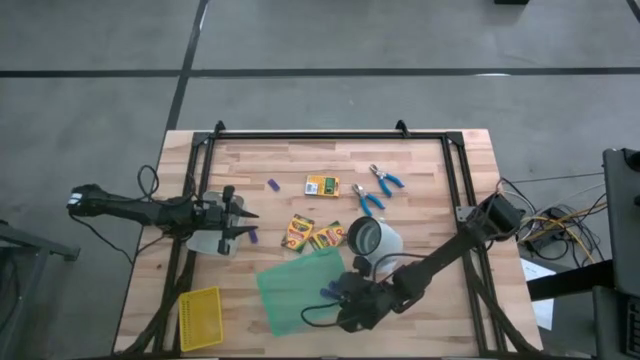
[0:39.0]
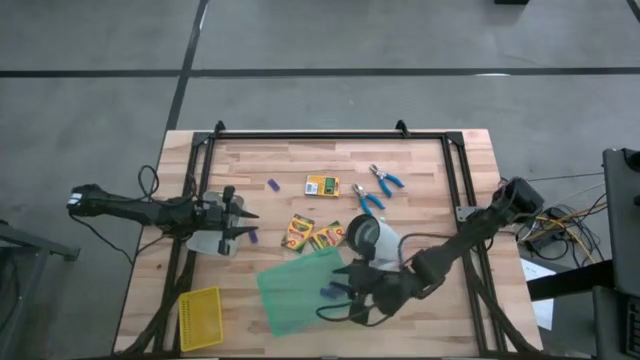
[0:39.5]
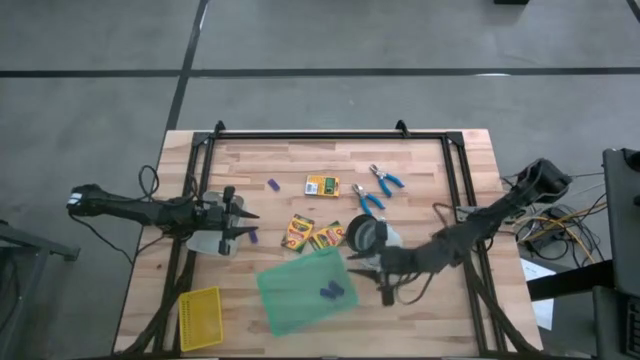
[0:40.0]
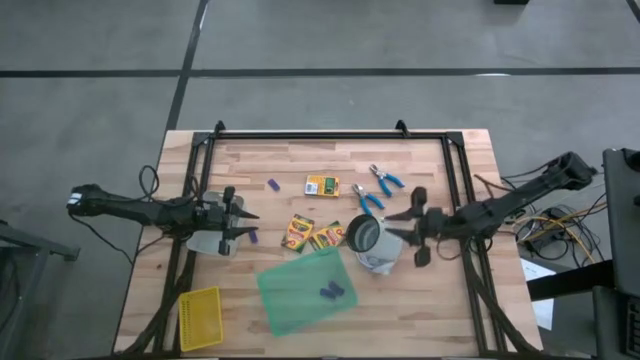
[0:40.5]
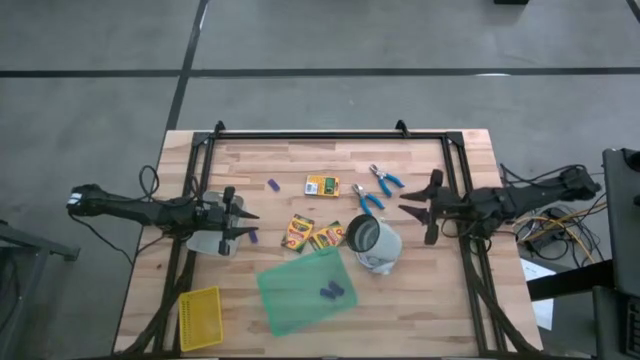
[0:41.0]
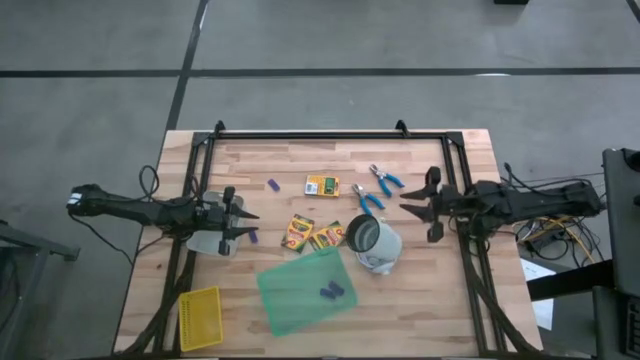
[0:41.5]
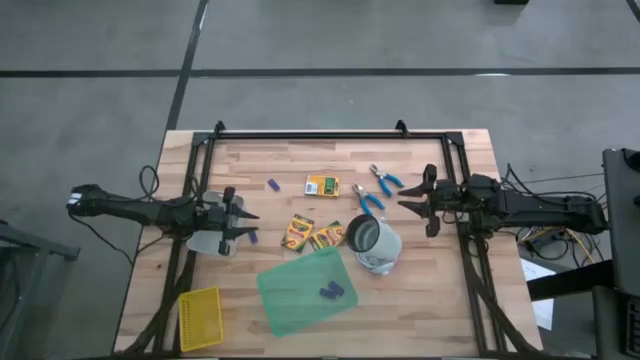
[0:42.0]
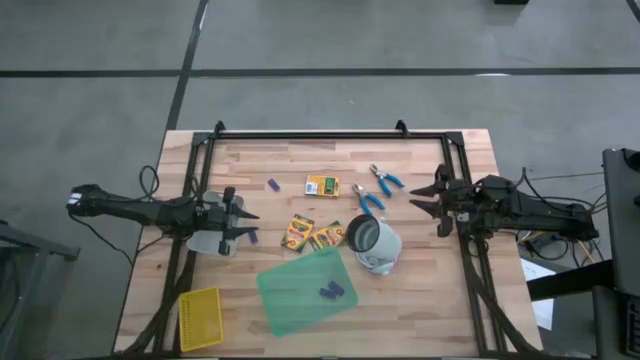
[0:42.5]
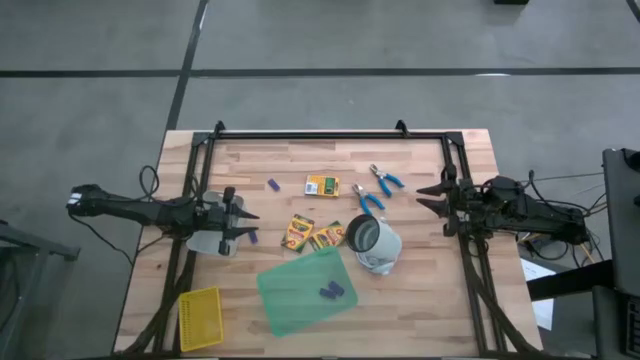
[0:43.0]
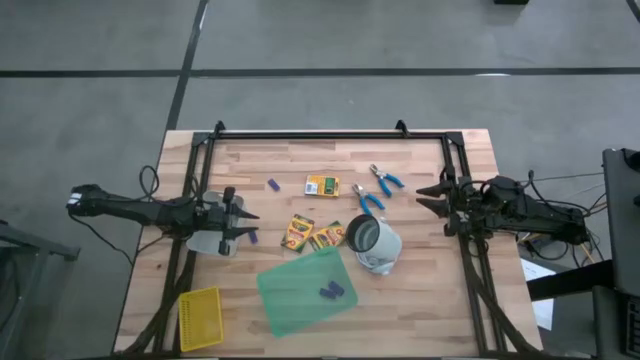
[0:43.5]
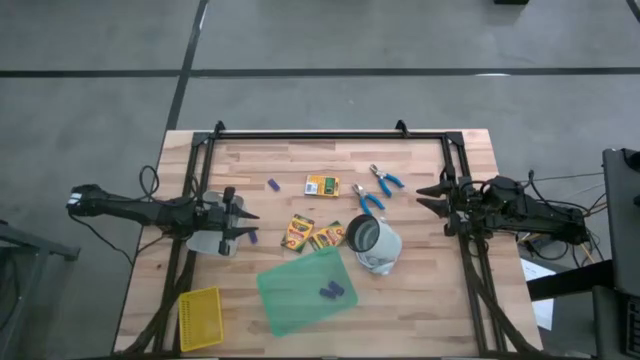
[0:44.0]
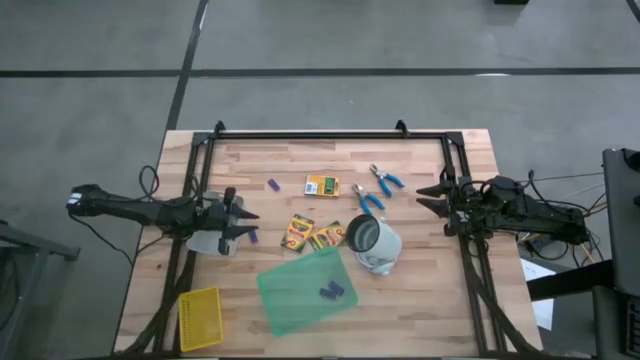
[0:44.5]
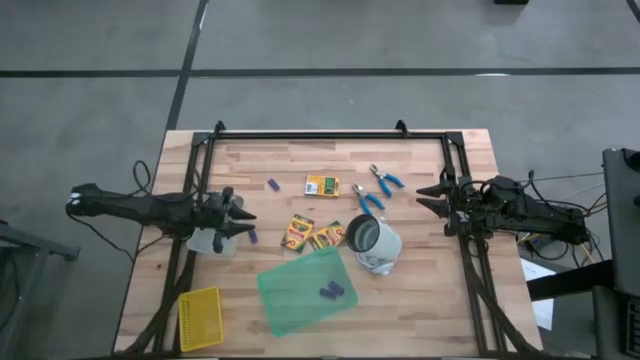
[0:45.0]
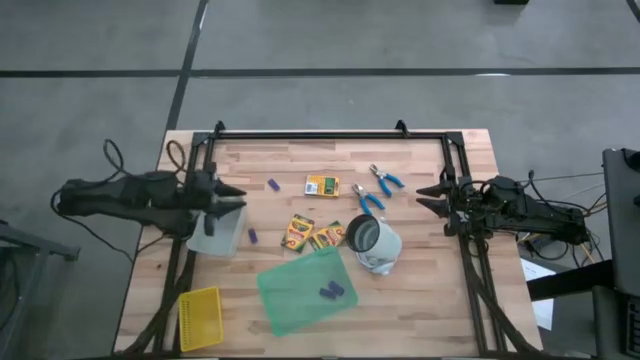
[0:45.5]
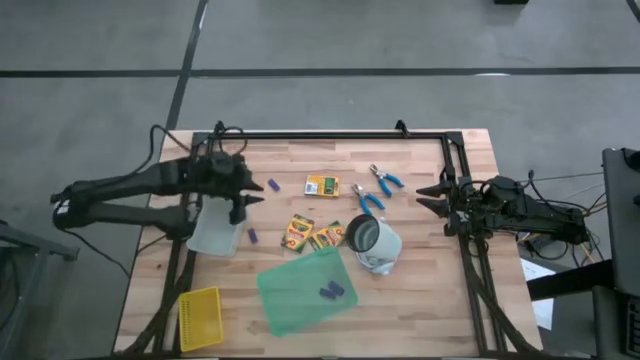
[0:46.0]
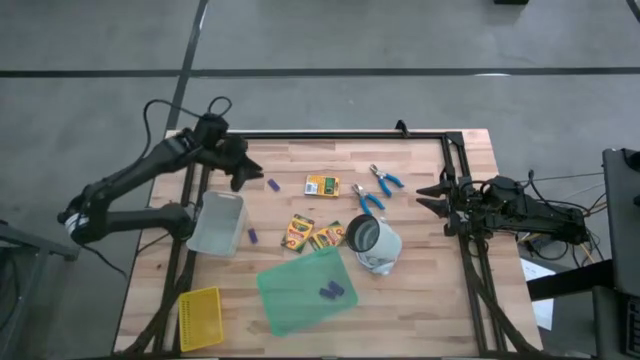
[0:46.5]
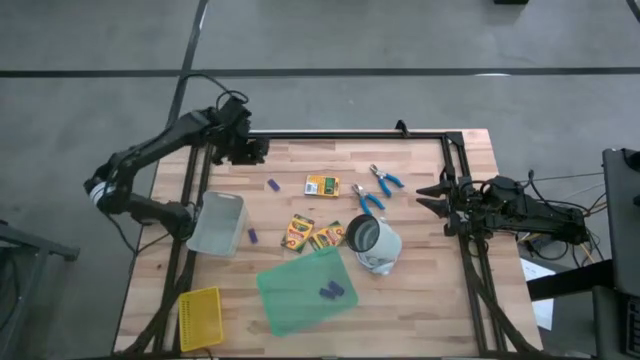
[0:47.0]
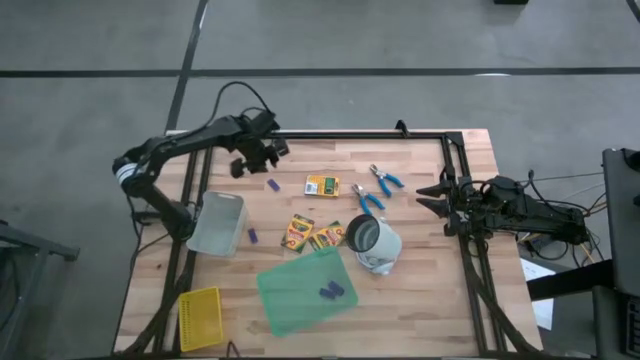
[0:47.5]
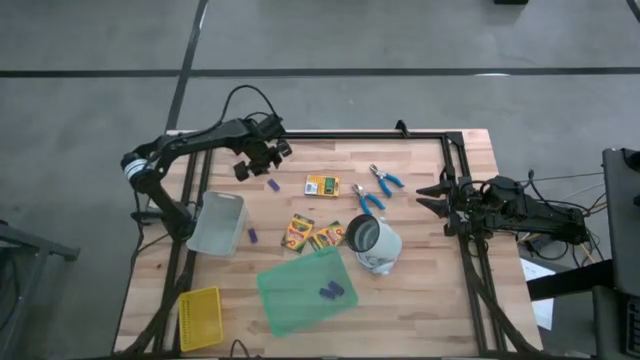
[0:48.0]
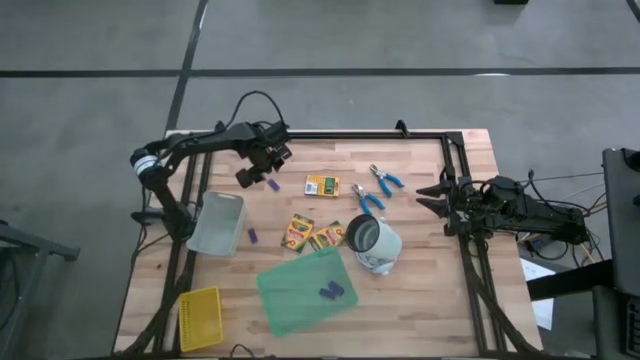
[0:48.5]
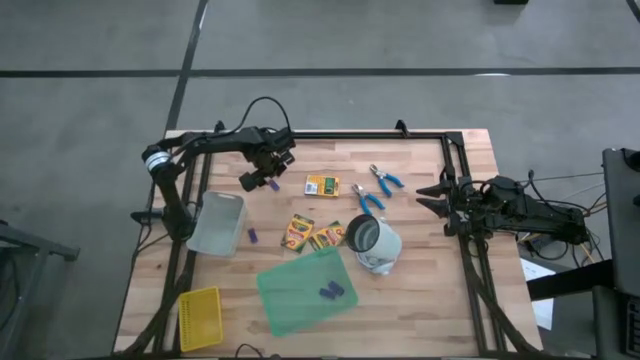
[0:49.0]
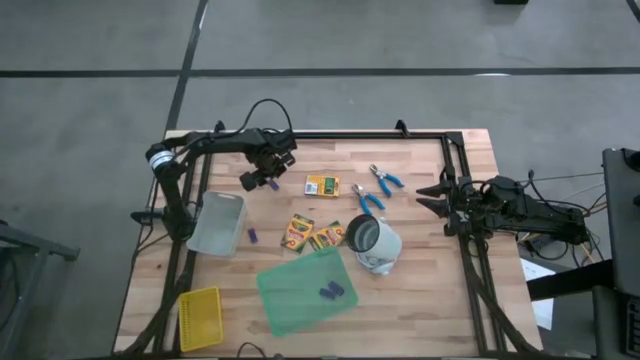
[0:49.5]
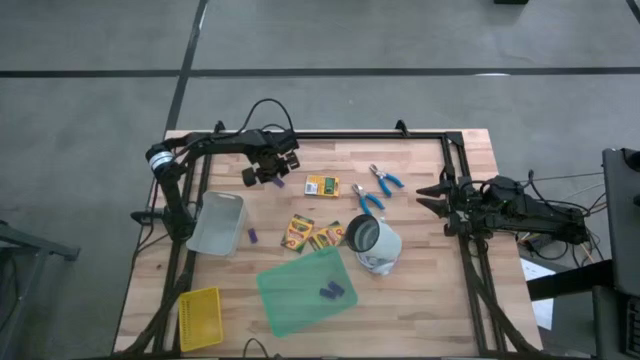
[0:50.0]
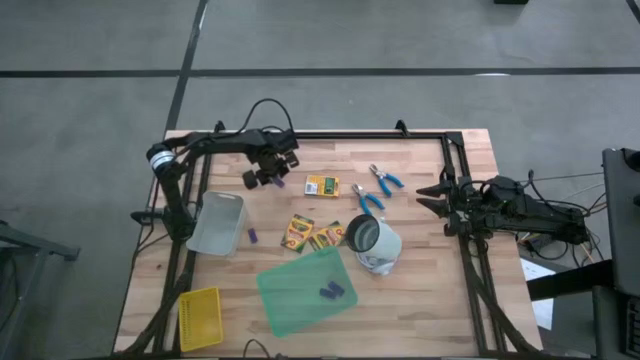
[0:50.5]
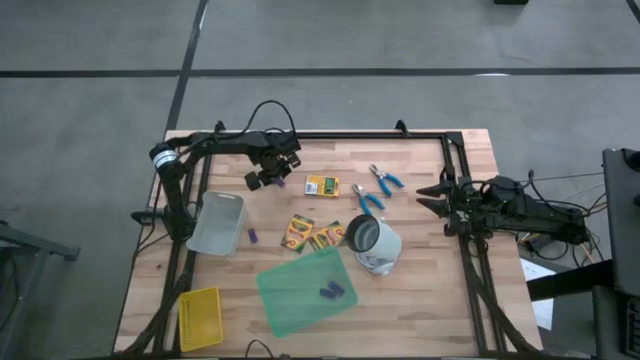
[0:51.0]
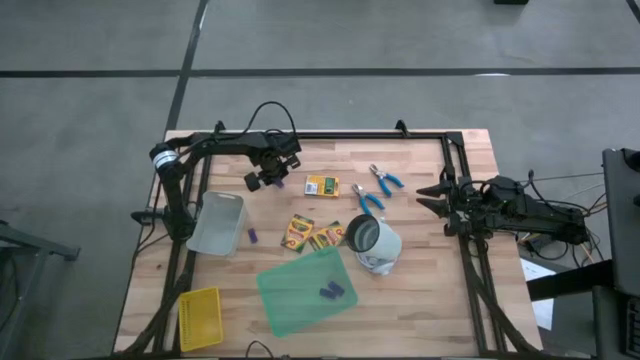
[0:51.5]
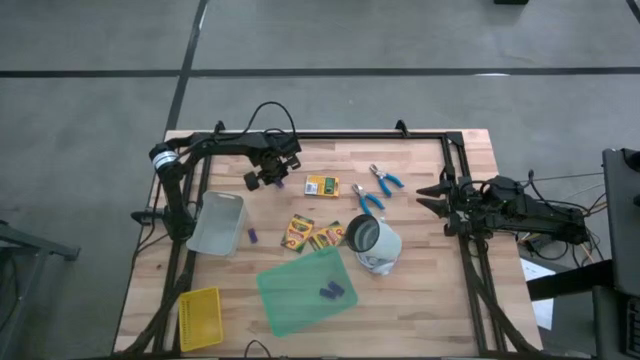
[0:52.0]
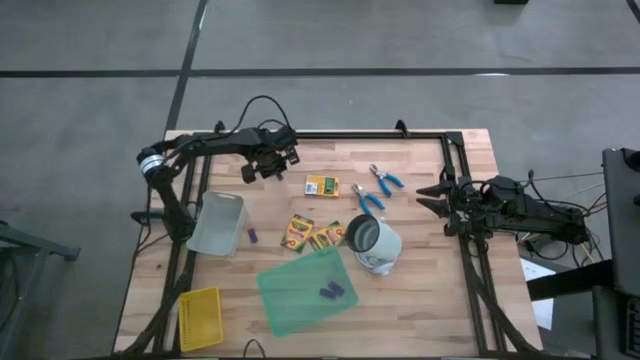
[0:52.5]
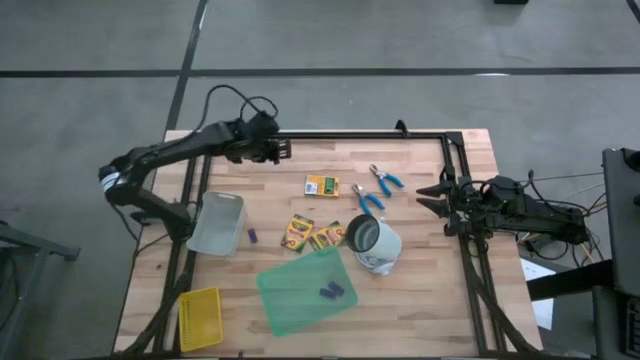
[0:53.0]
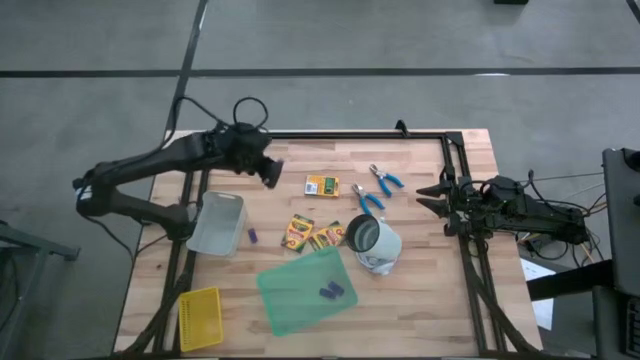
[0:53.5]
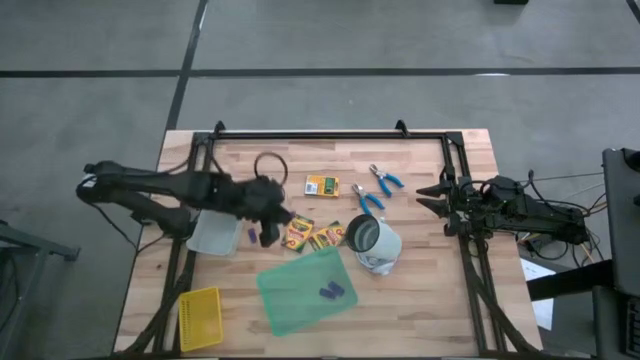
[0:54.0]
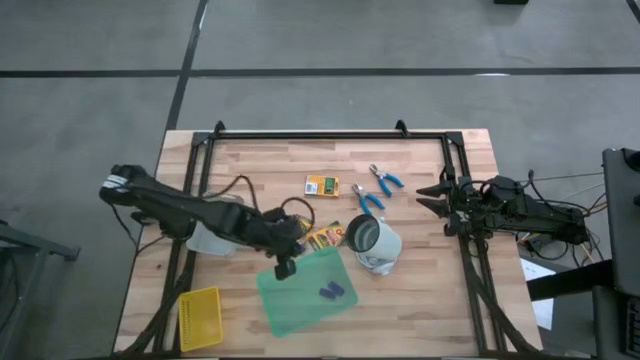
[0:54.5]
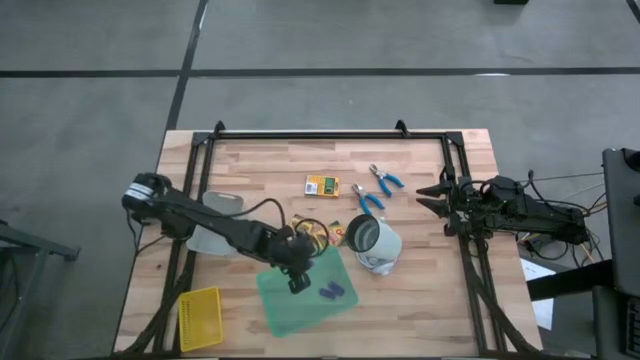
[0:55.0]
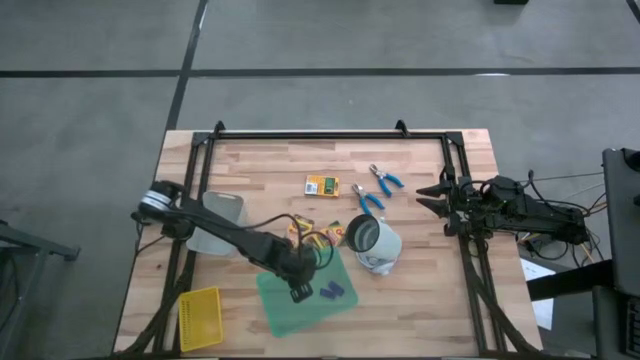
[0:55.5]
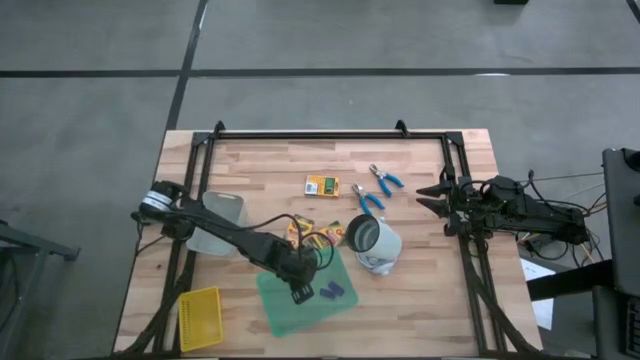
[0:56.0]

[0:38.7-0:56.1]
Task: Pick & Place School Supplies
Put the blue eraser into the green bin

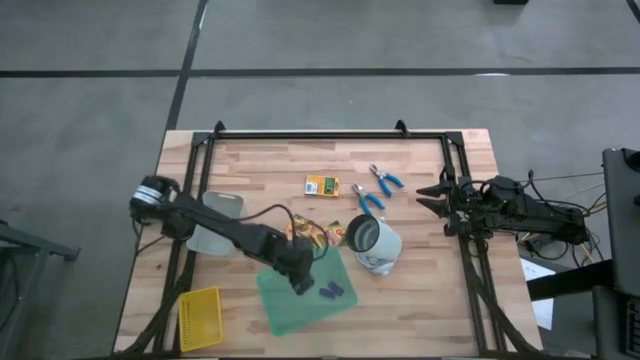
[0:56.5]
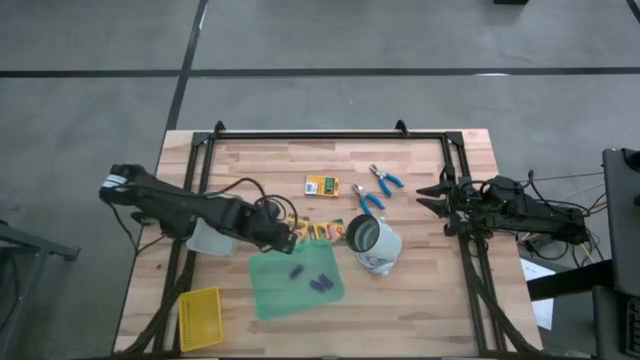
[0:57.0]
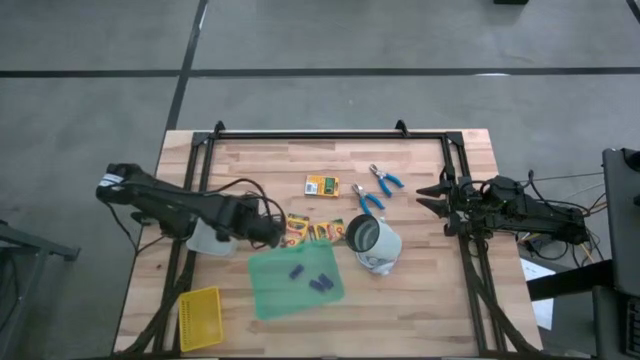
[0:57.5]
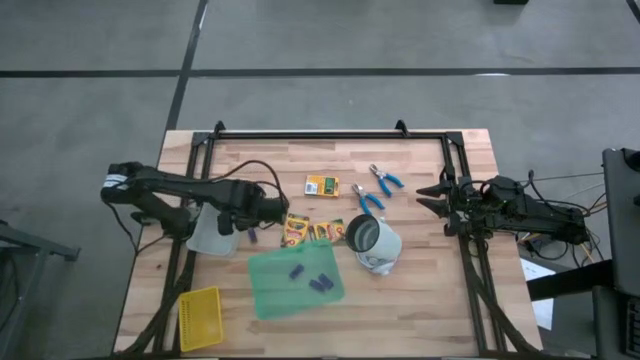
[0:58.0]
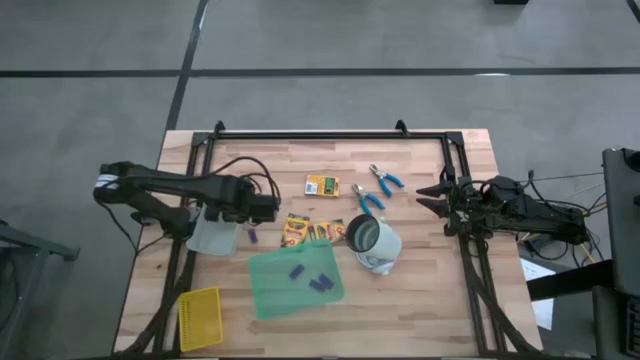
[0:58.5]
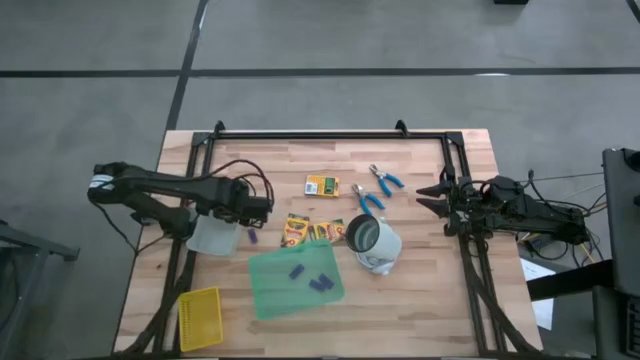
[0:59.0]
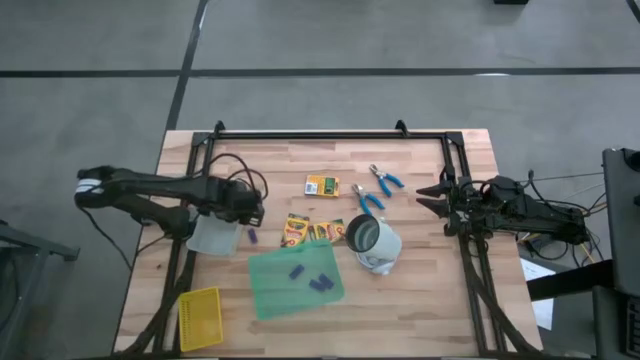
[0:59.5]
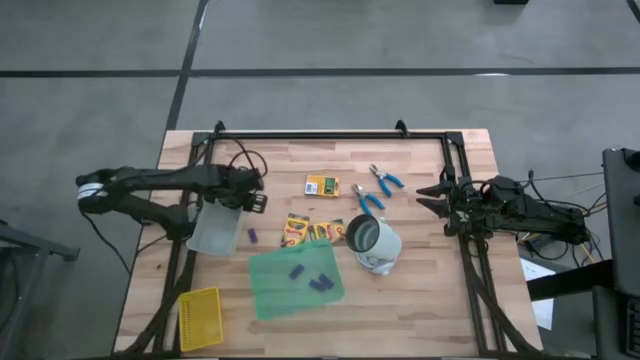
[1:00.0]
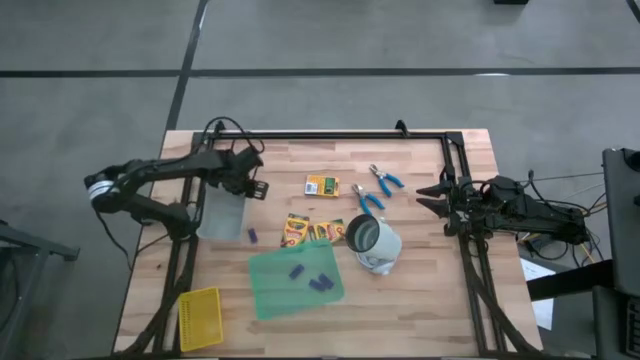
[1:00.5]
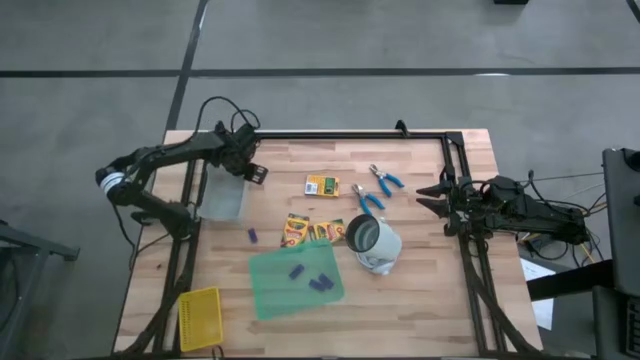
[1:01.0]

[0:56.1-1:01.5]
Adjust the gray bin
